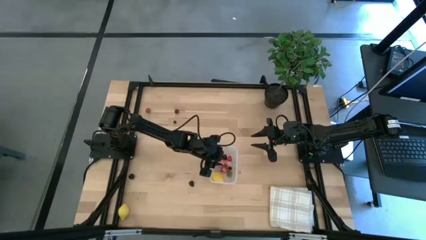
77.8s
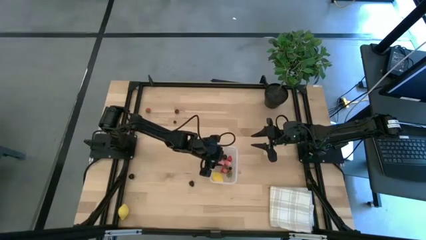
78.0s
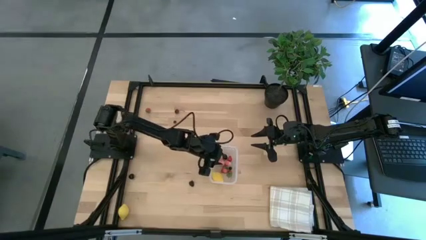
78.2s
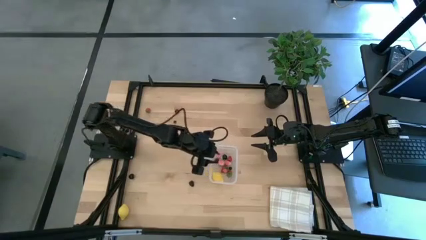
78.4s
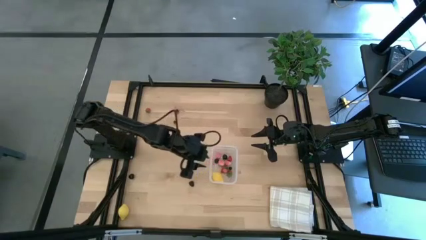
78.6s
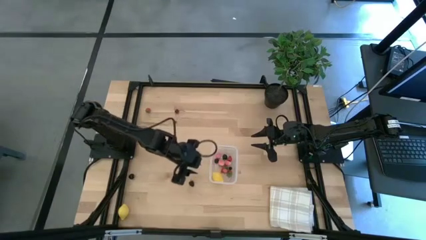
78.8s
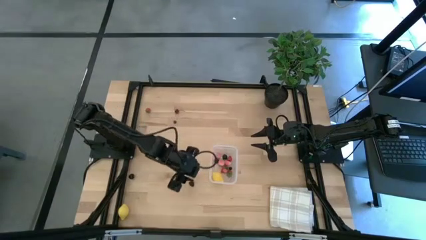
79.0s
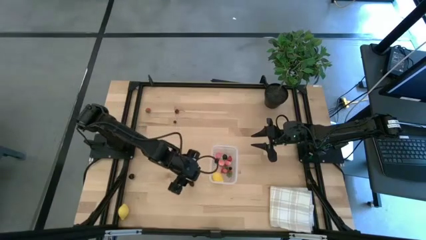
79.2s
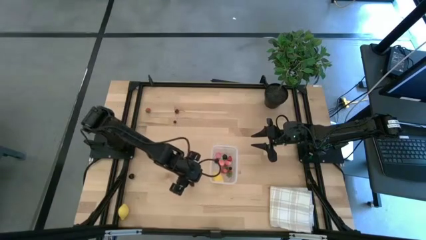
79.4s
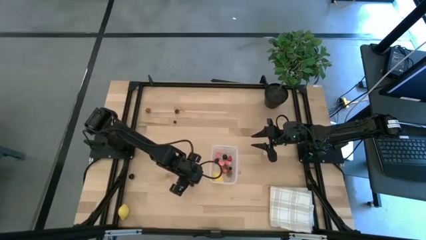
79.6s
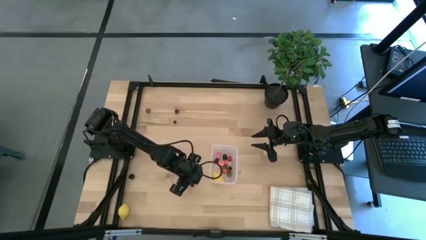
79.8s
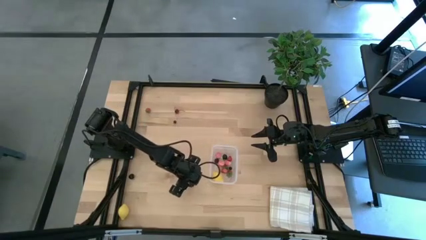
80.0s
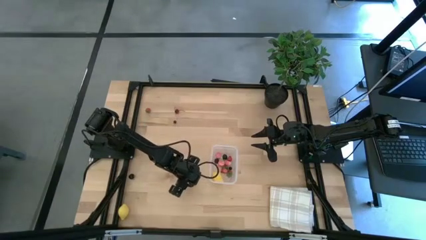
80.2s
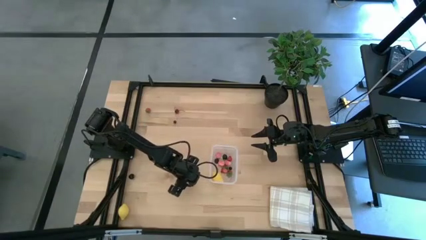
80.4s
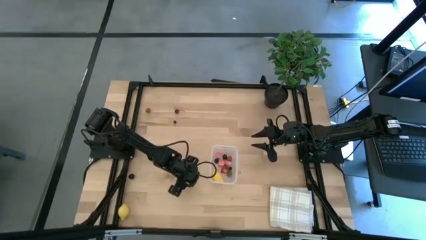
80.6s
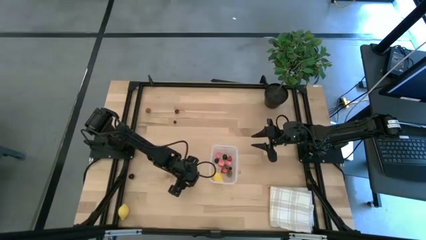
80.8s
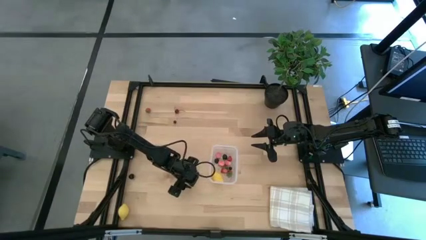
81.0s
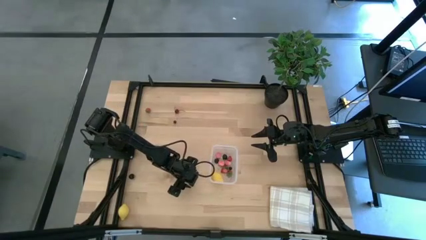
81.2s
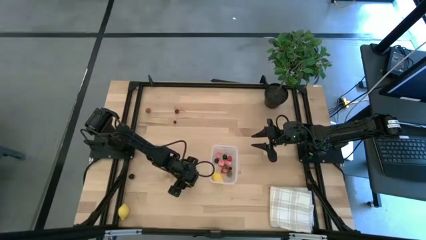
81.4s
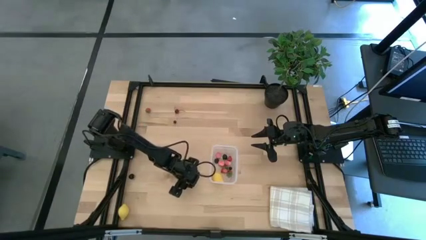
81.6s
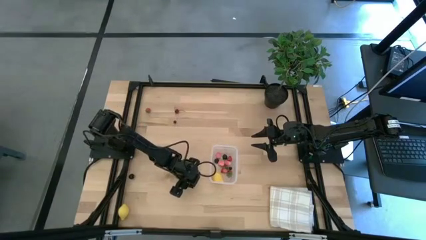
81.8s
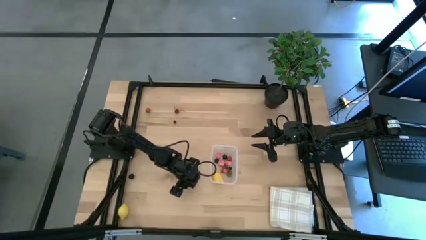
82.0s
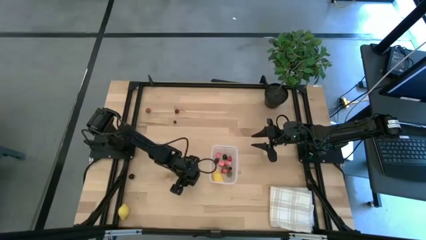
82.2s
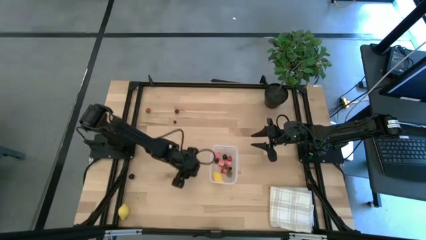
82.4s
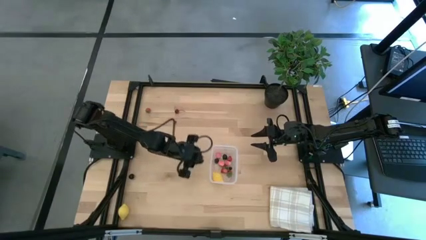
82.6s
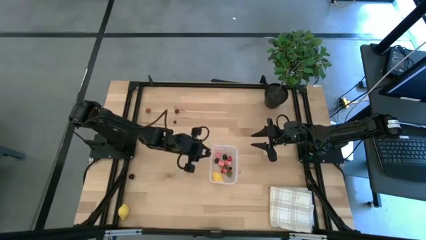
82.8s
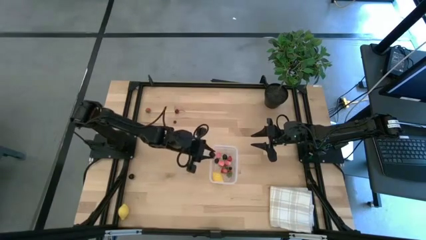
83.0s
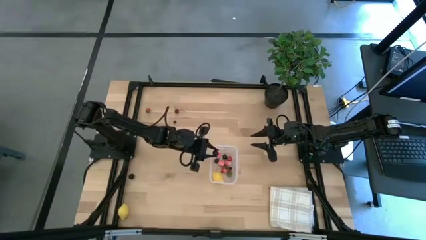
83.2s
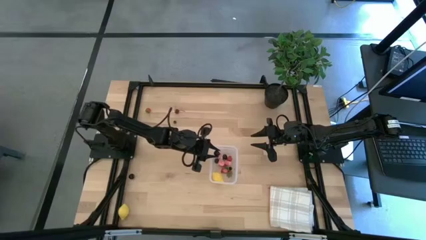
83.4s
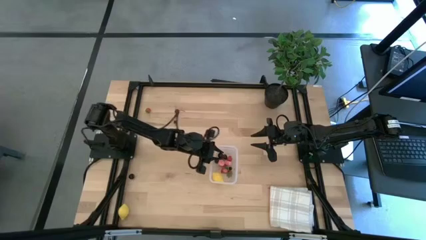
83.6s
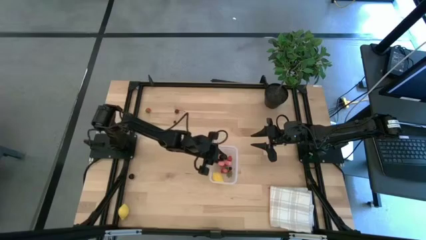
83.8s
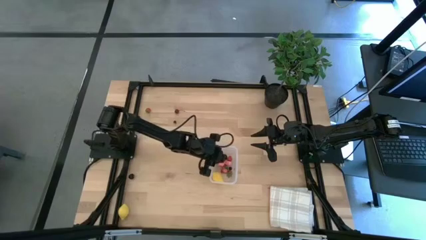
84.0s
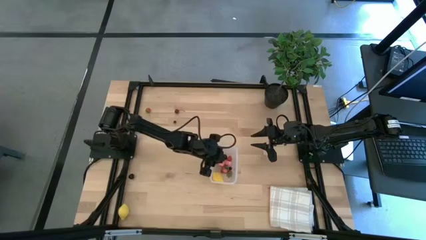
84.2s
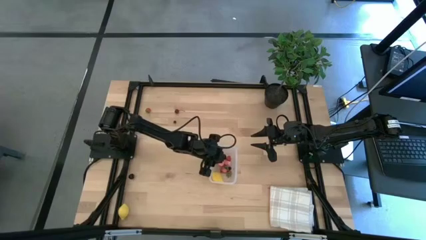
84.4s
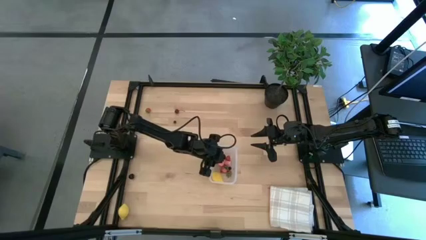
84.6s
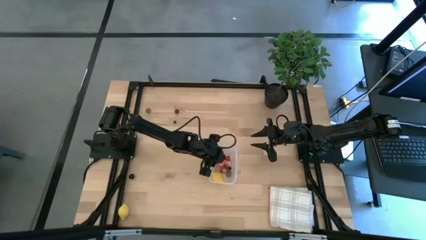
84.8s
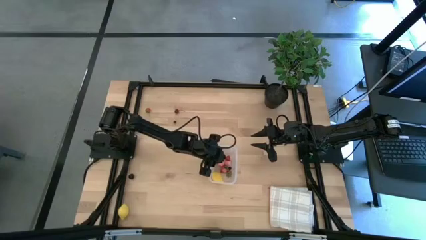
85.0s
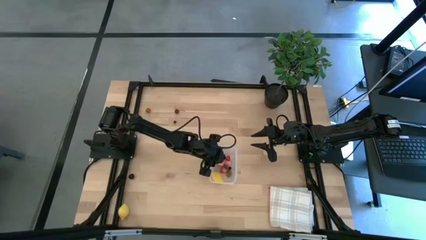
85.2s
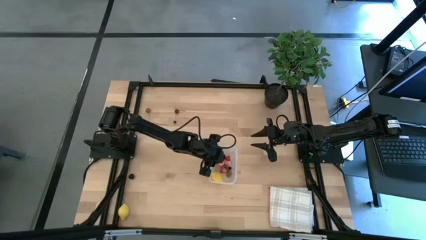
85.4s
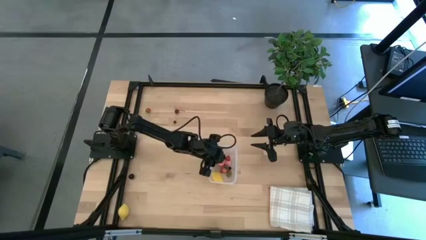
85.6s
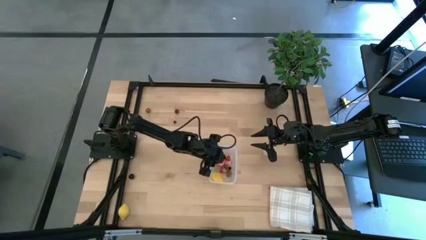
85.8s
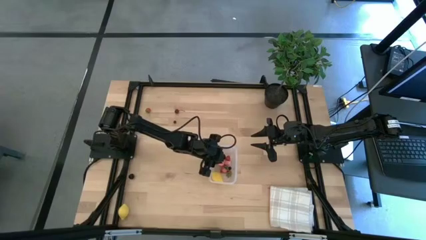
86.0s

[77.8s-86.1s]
Task: Pick and placing Produce into tupperware
Put the blackberry into the transparent bin

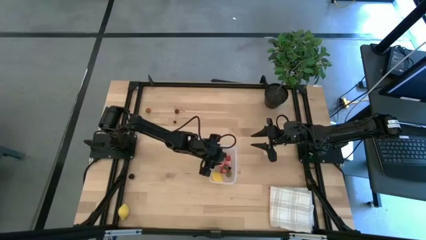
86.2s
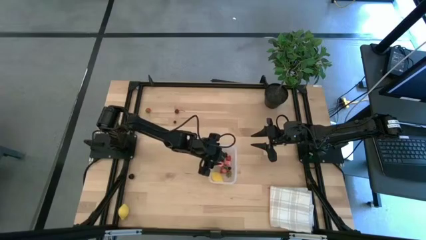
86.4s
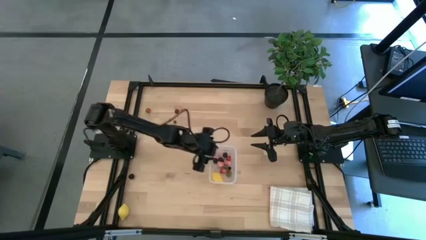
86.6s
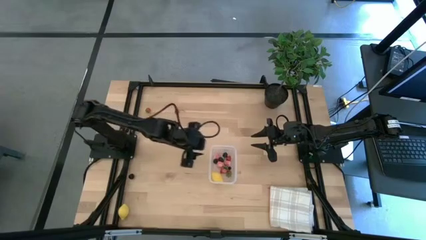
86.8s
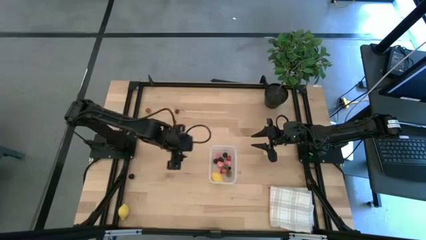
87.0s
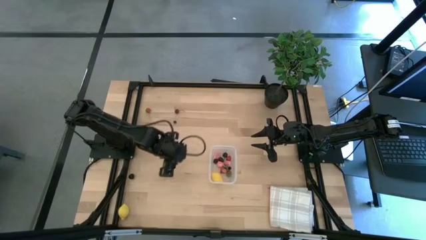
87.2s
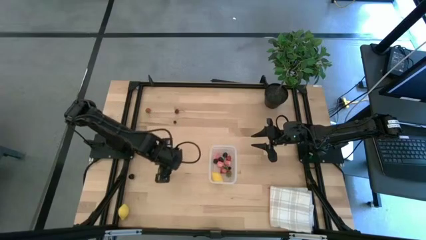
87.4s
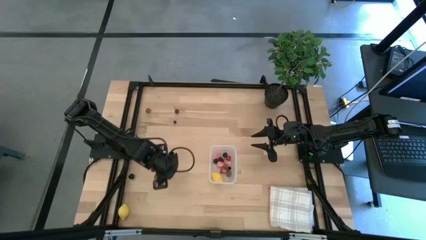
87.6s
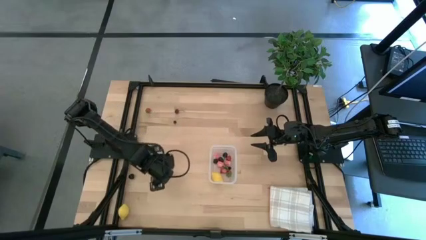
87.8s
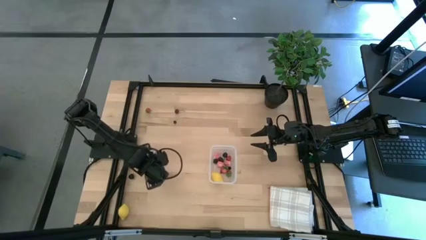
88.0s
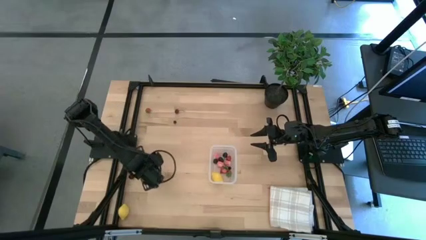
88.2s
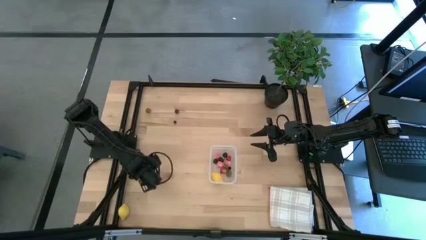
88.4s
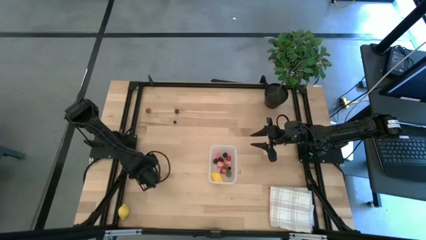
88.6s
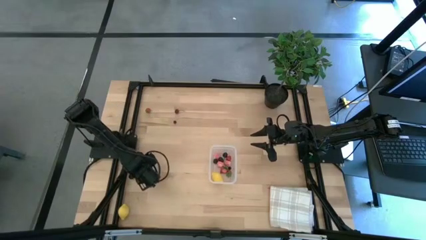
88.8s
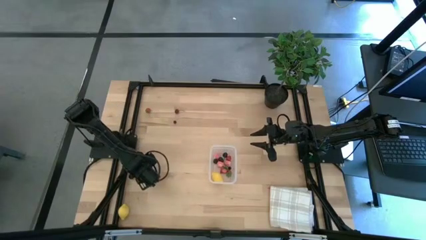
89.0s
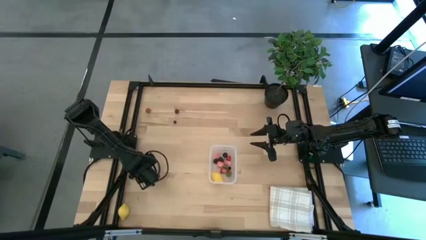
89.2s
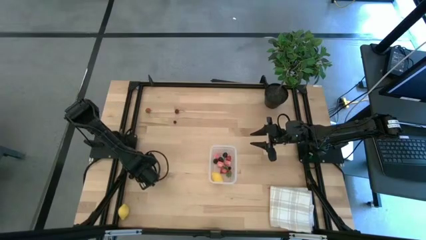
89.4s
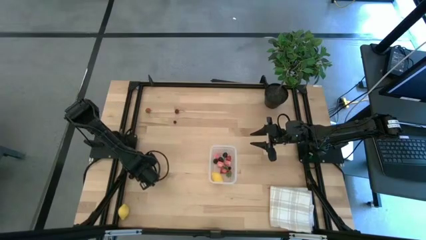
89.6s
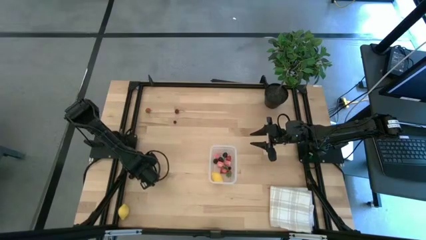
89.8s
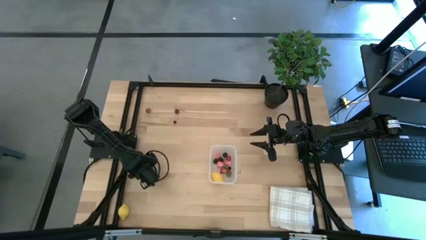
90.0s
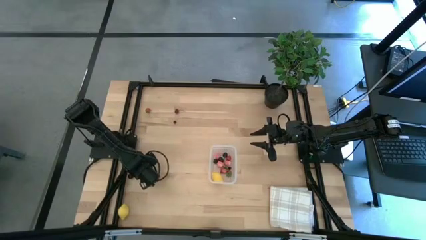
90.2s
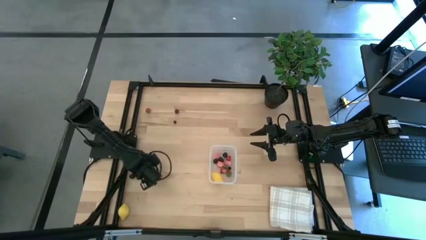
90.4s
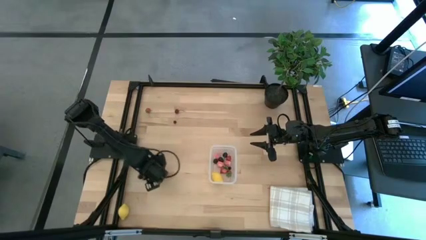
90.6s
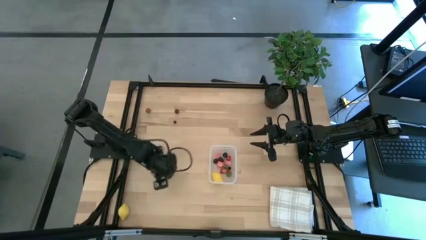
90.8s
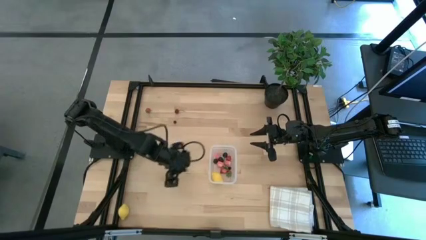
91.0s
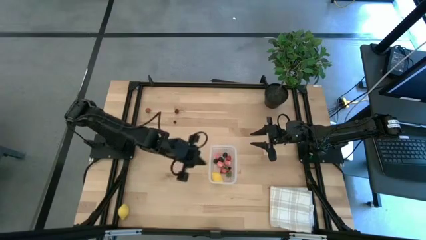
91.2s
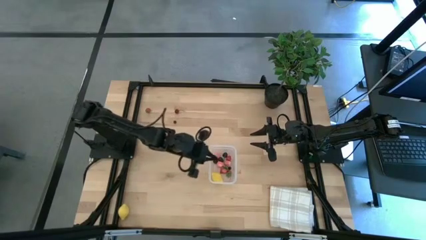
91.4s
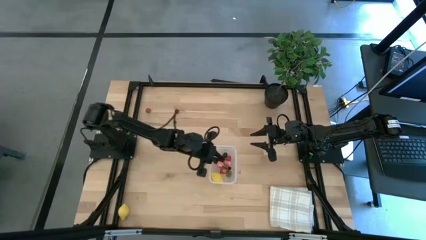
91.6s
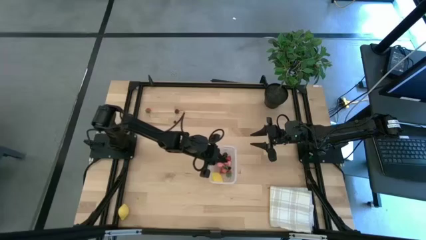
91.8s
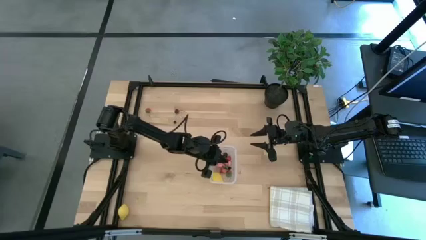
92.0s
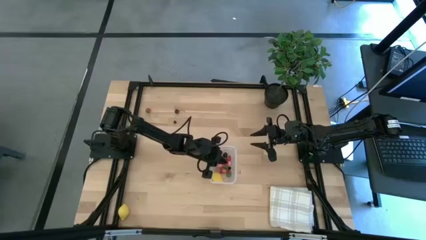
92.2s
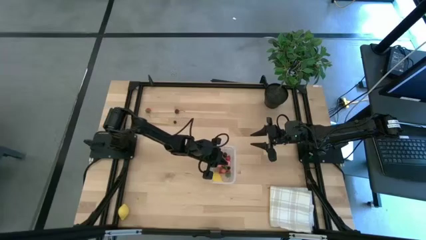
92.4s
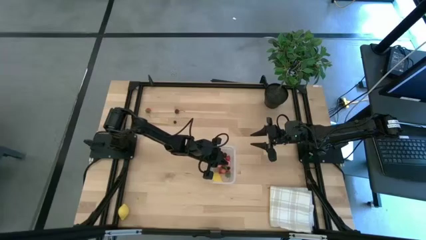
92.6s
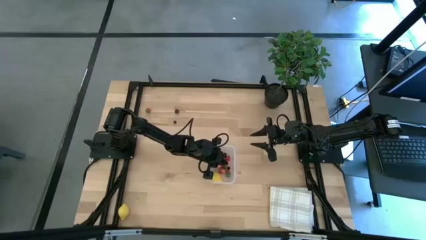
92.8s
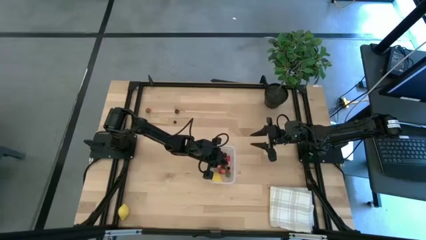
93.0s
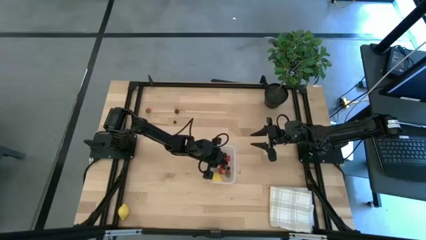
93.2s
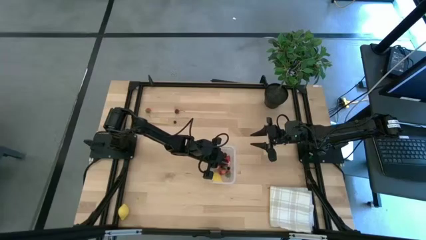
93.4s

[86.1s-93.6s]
Put the cherry into the transparent bin

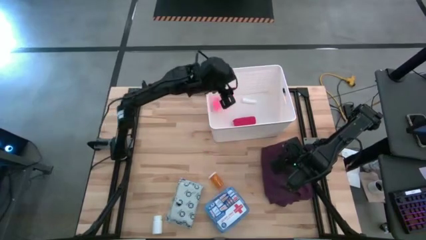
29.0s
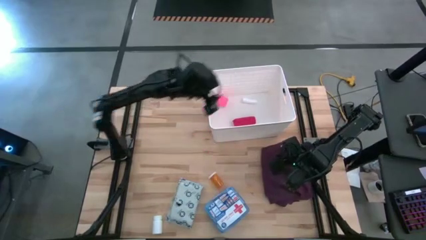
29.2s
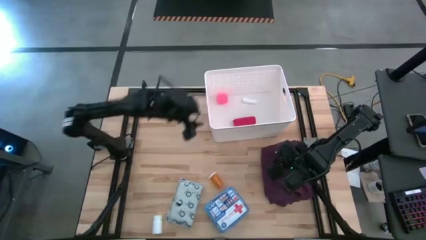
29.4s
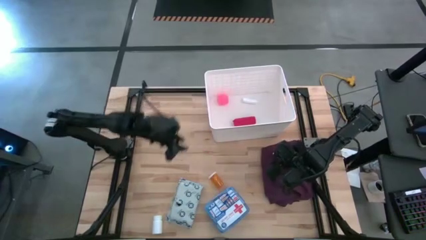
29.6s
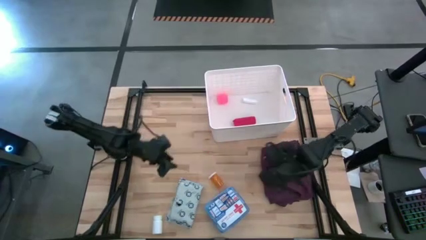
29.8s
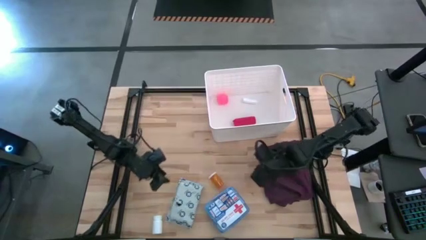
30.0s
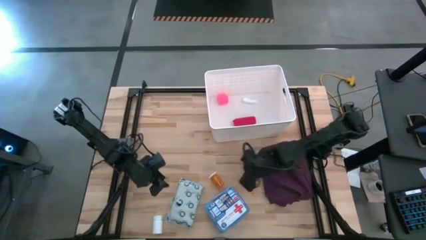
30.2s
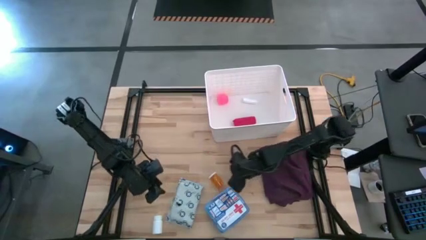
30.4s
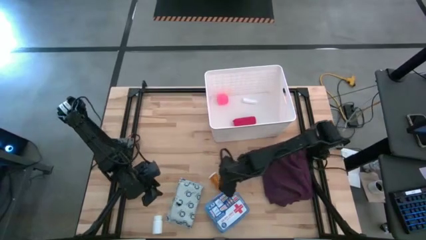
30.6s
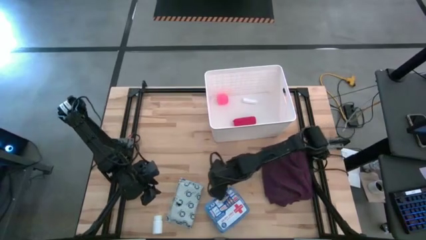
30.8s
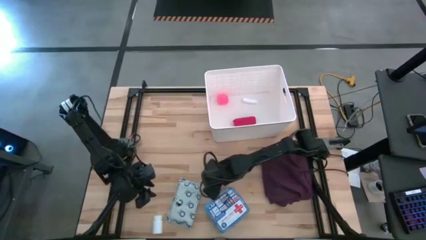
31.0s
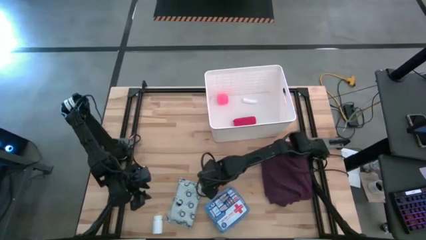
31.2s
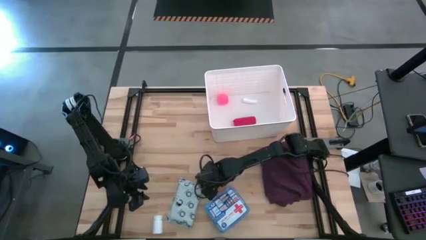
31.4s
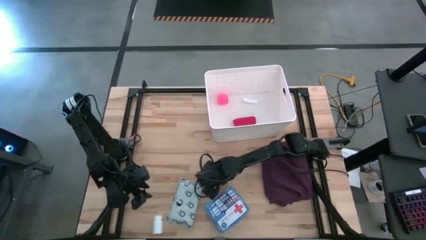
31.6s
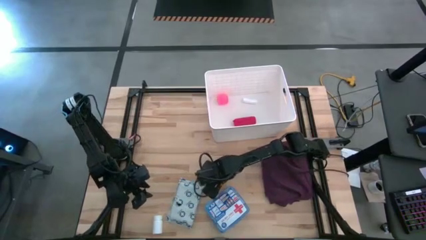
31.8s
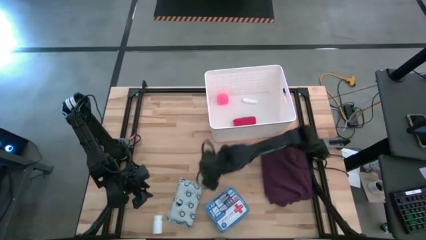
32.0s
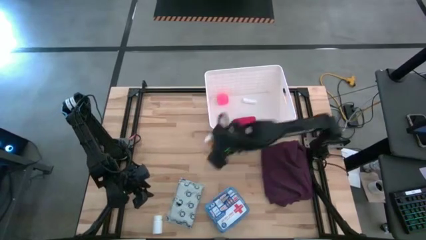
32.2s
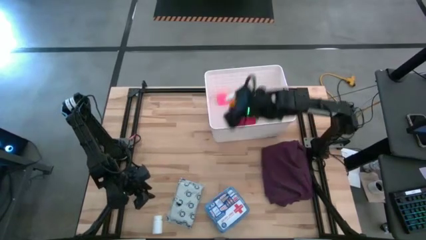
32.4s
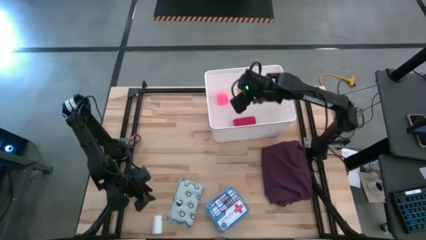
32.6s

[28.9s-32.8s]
Task: Pick & place medical supplies in basket/bin
Put the orange pill bottle into the white bin
